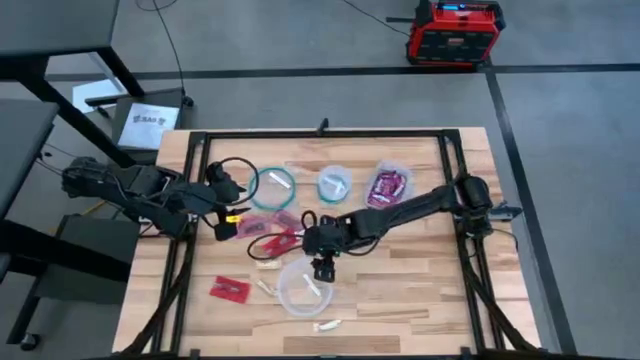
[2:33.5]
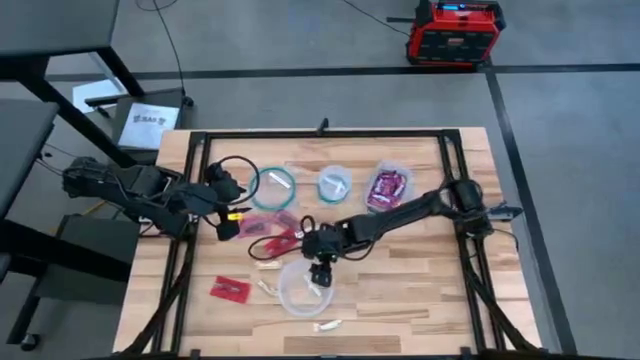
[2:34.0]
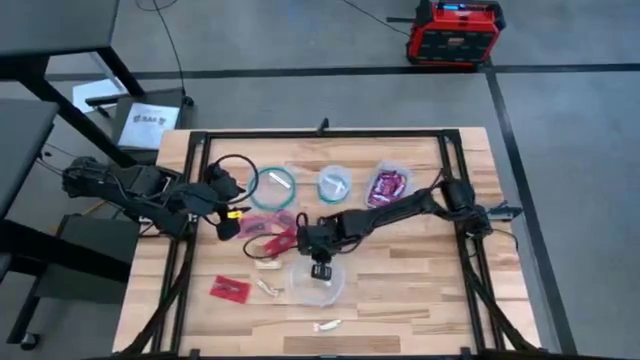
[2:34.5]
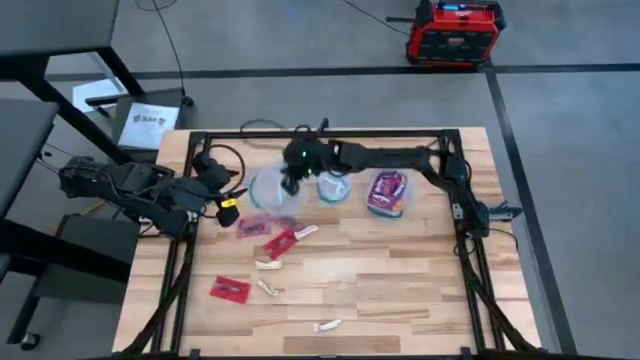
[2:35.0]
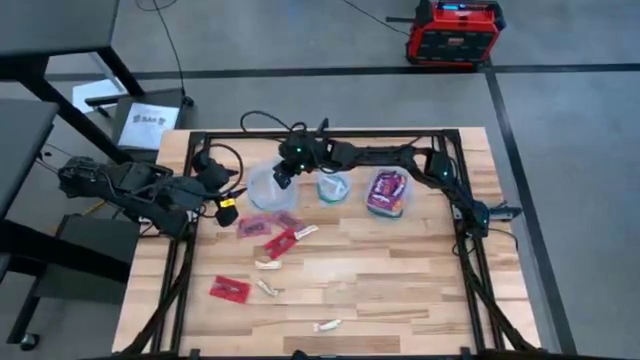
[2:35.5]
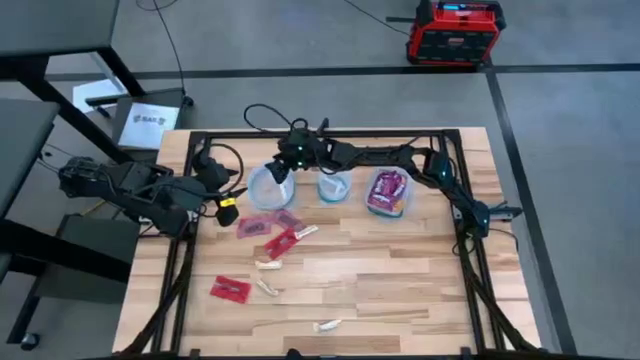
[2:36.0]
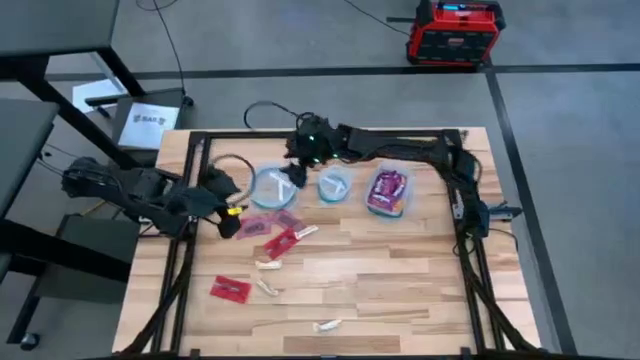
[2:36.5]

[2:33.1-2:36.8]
Task: Sort candy
Move the center transparent bin to the top left

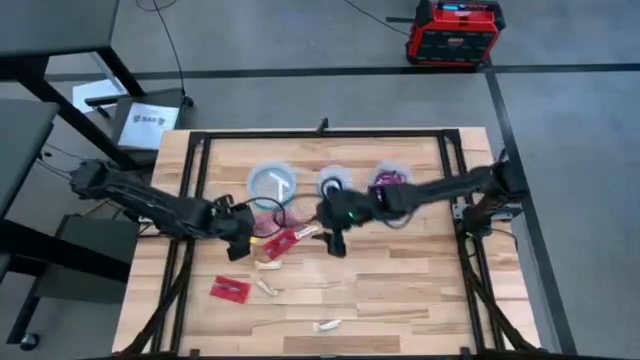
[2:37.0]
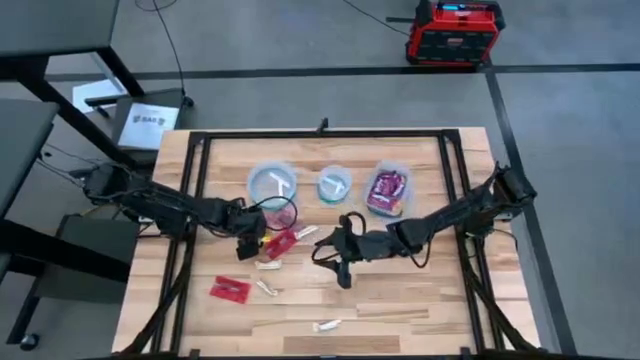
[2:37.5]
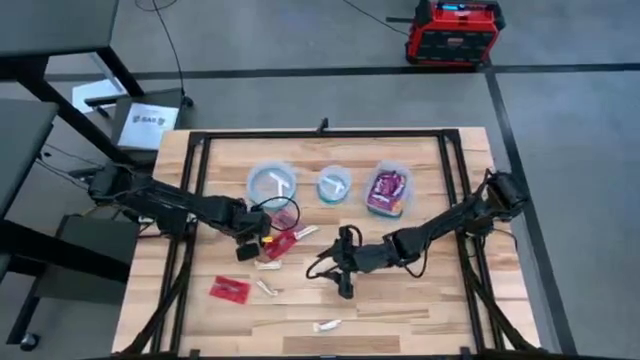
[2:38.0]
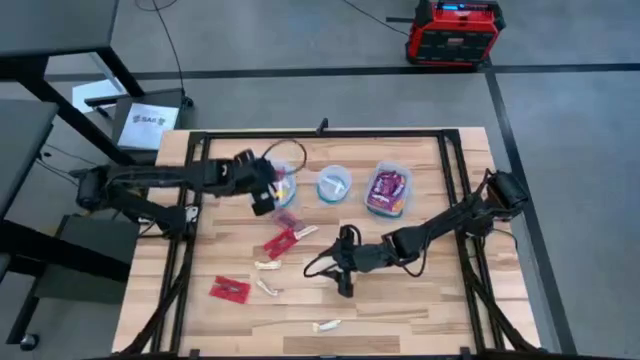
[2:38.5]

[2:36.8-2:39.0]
Put the top center red candy into the top left transparent bin

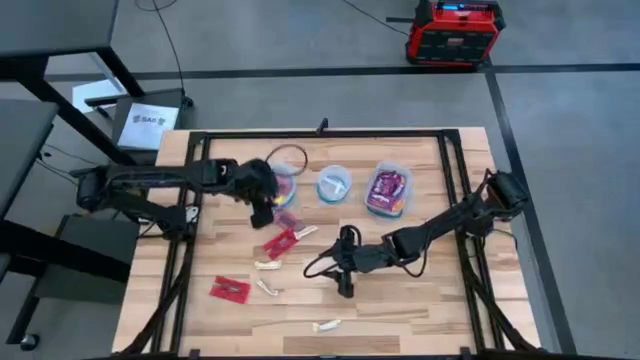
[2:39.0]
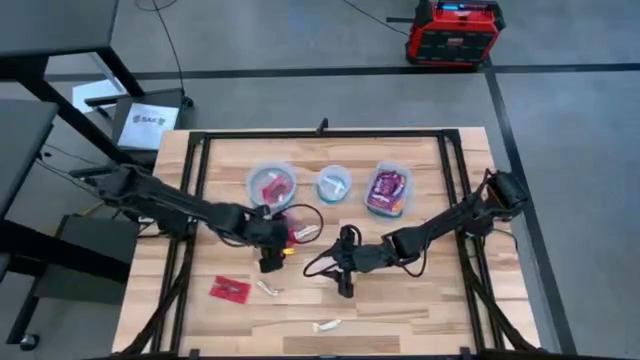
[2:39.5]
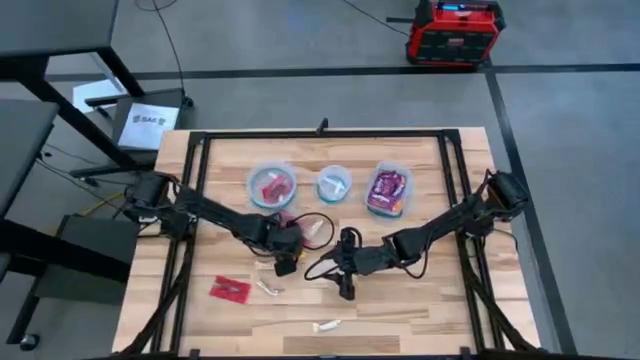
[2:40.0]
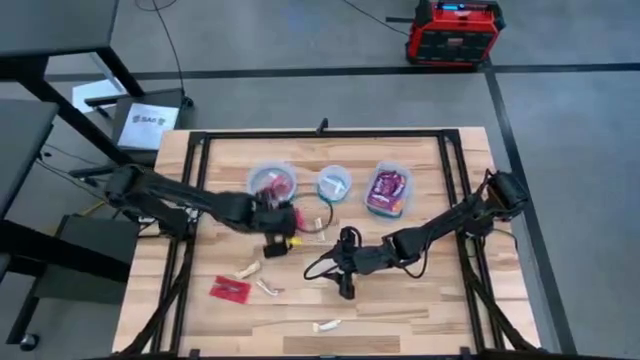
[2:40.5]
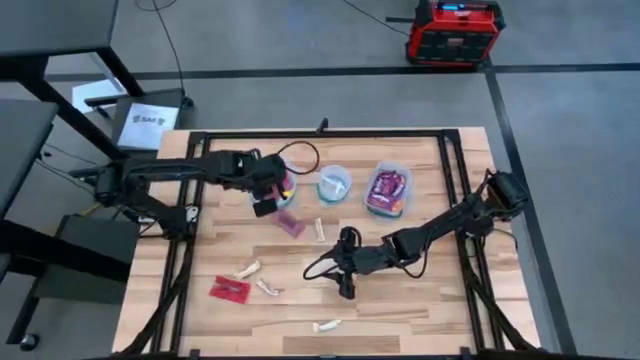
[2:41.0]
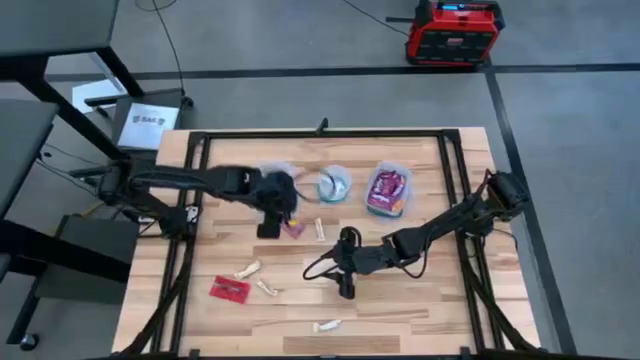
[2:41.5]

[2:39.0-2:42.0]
Put the middle red candy into the top left transparent bin

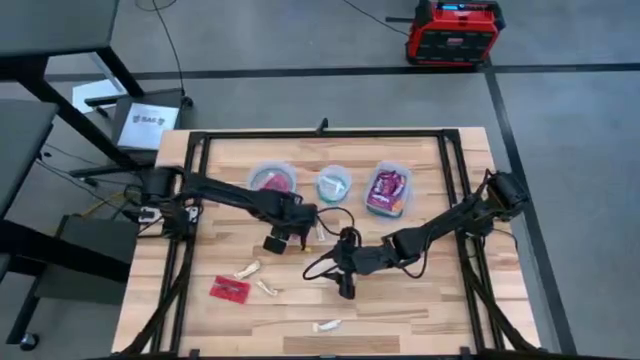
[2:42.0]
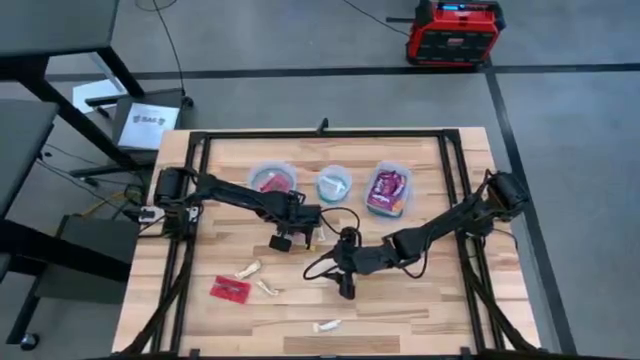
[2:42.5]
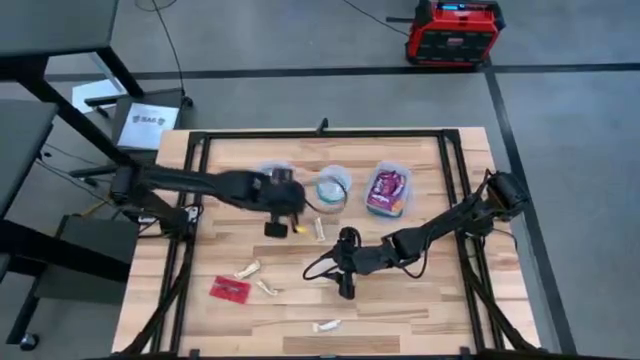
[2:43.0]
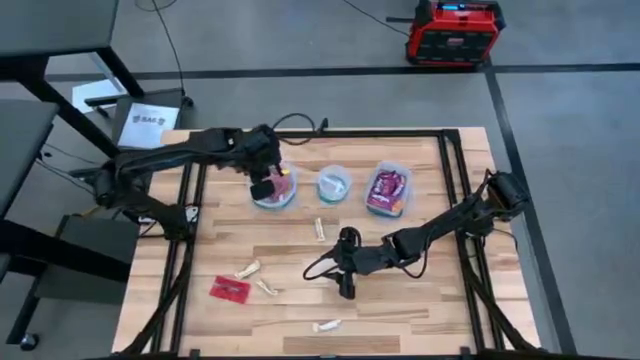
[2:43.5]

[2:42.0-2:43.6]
Put the top red candy into the top left transparent bin

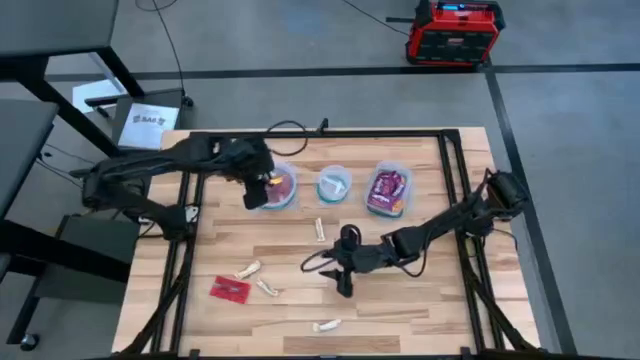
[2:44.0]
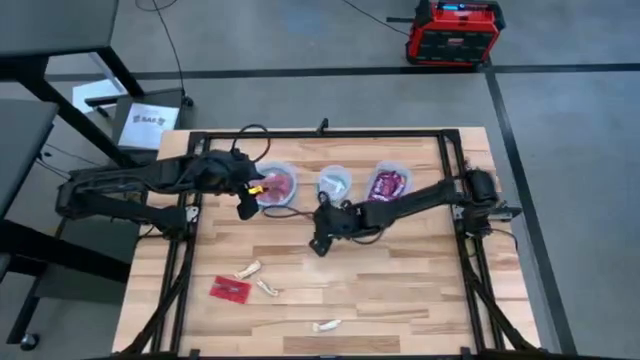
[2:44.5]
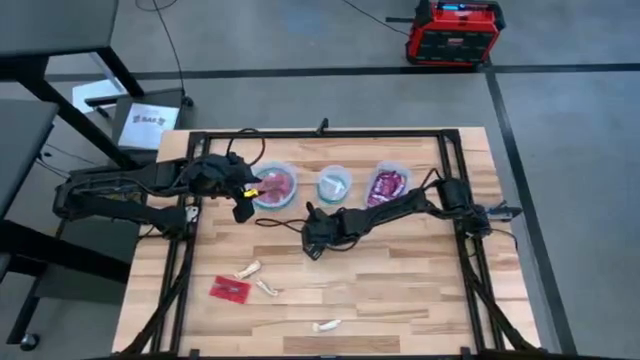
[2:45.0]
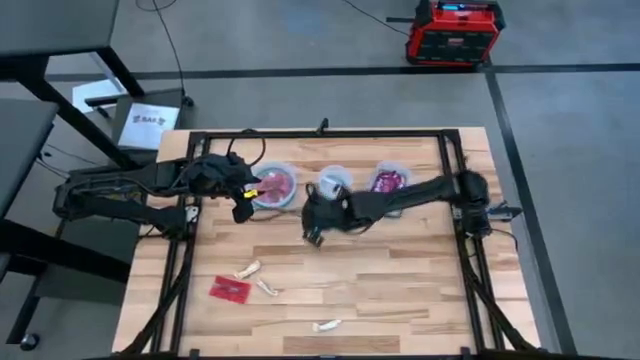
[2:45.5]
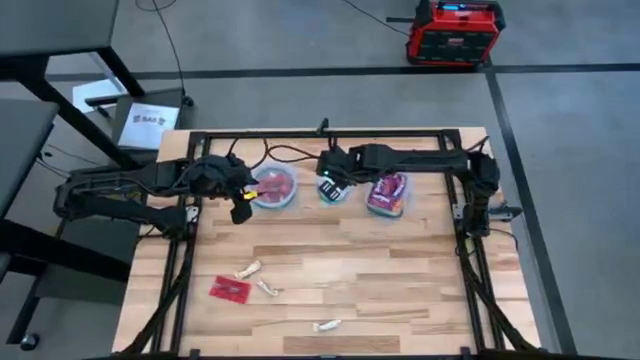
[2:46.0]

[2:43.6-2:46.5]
Put the top right yellow candy into the top center transparent bin

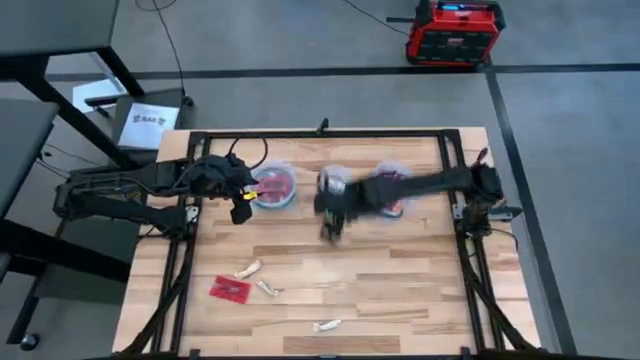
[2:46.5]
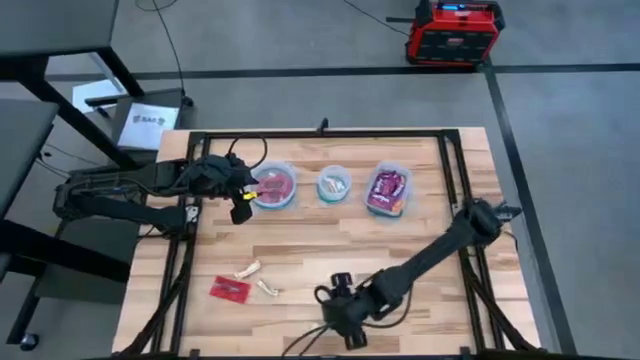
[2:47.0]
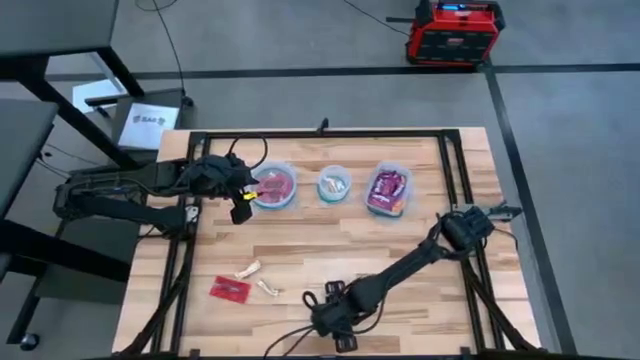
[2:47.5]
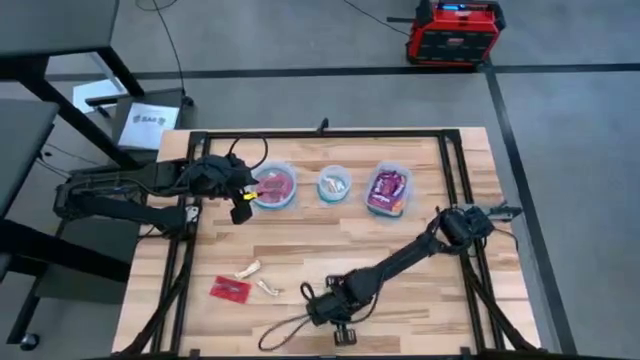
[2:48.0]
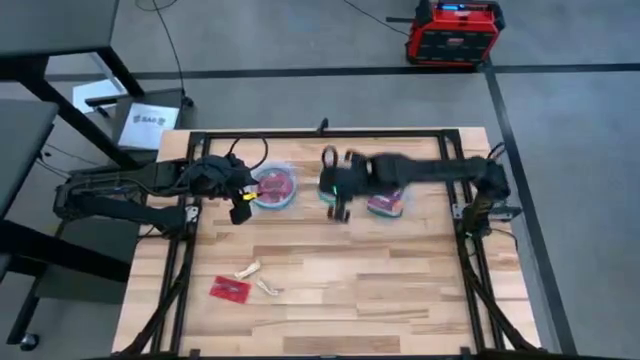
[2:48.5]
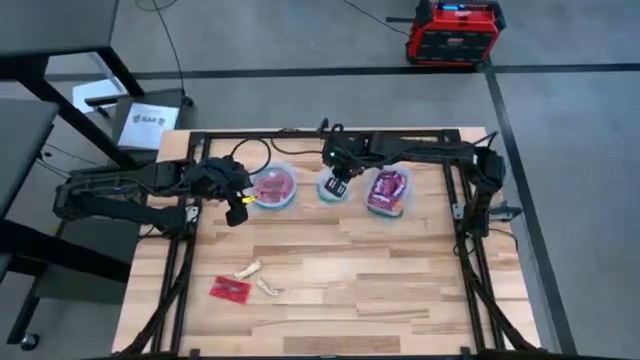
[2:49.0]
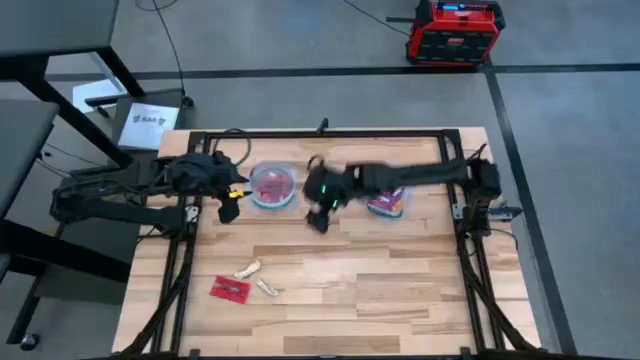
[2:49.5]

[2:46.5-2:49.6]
Put the bottom right yellow candy into the top center transparent bin

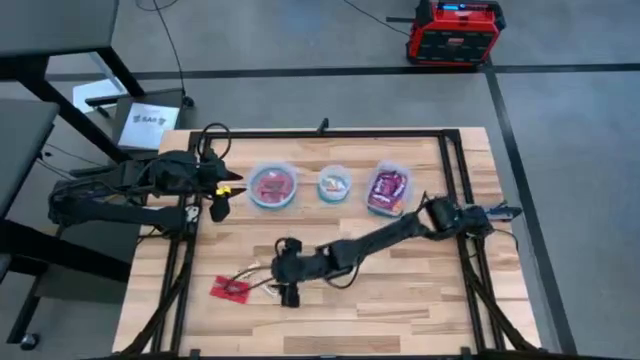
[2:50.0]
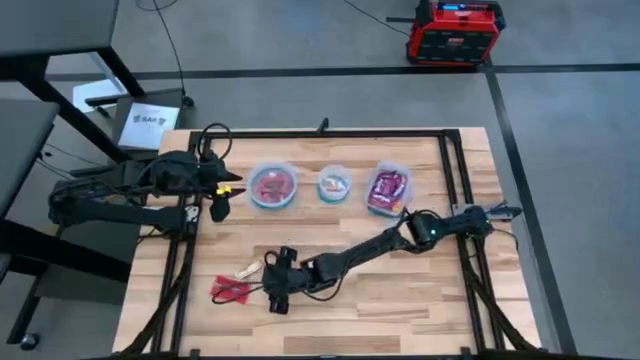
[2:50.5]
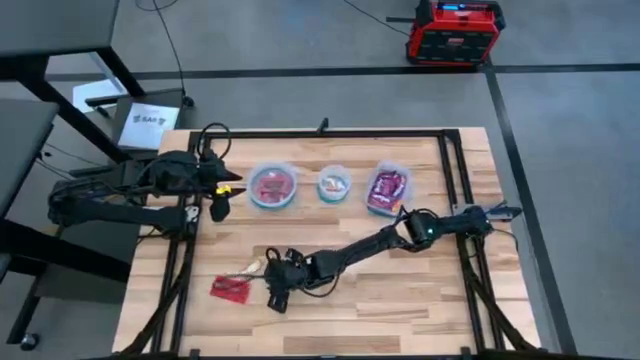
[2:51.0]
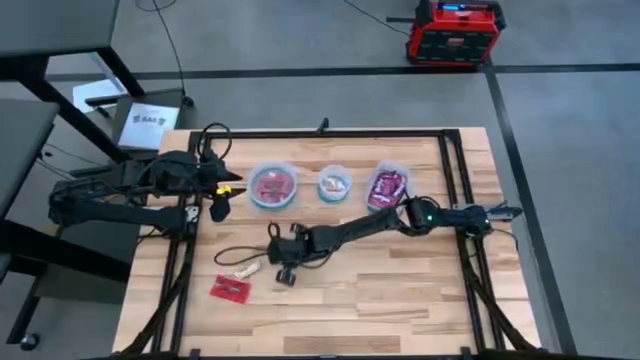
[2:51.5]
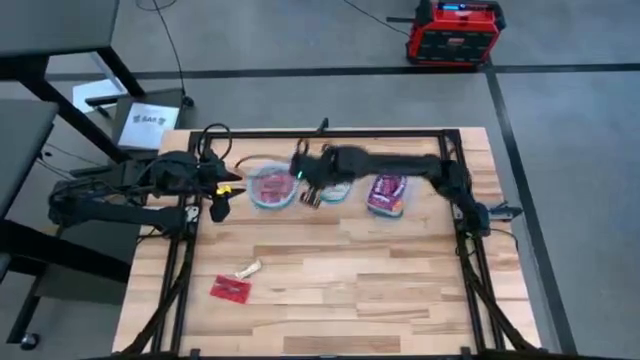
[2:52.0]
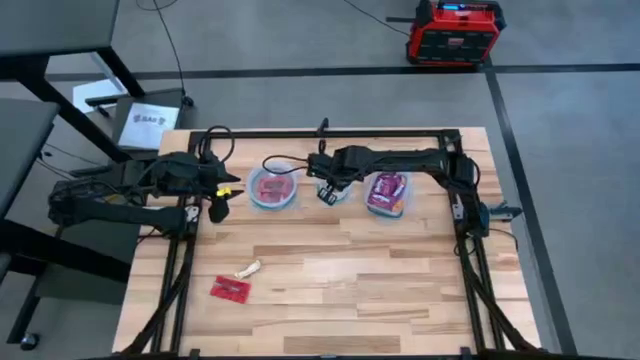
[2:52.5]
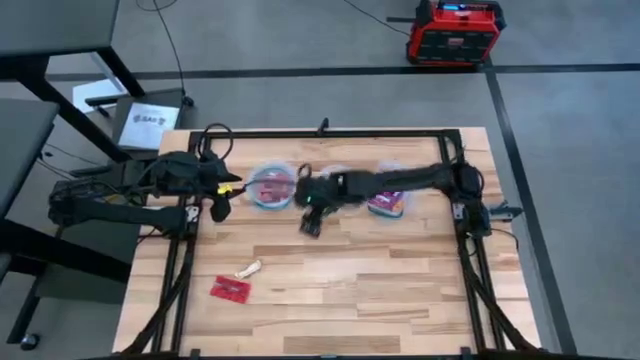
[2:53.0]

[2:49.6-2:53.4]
Put the right yellow candy into the top center transparent bin

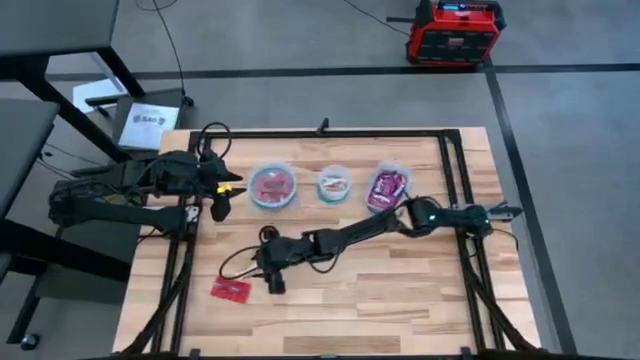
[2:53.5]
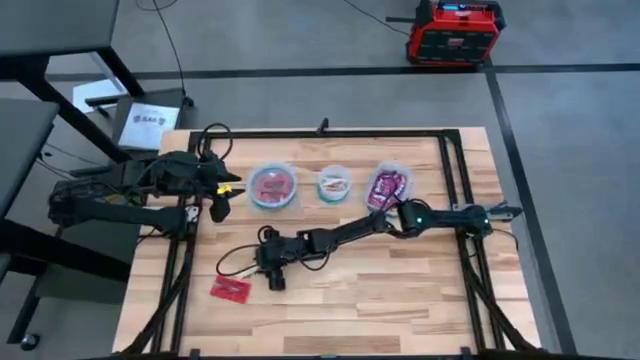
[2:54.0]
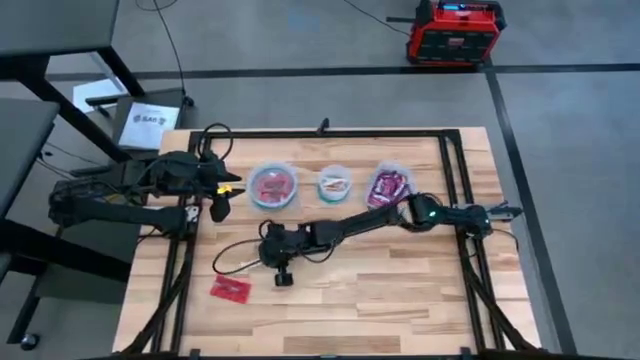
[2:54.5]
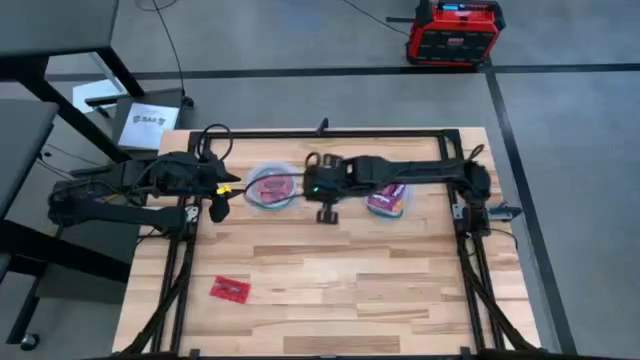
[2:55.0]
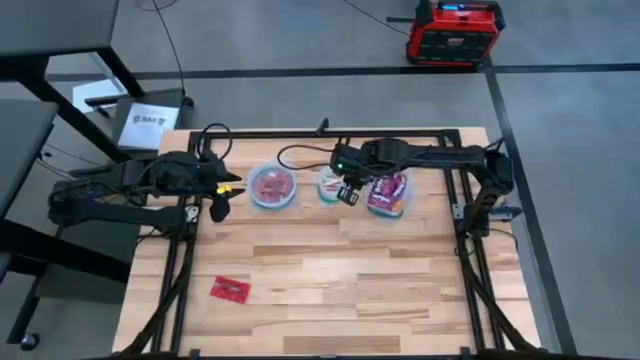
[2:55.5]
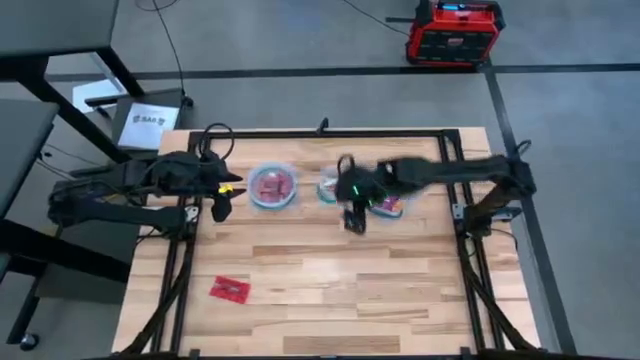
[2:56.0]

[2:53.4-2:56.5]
Put the yellow candy into the top center transparent bin
